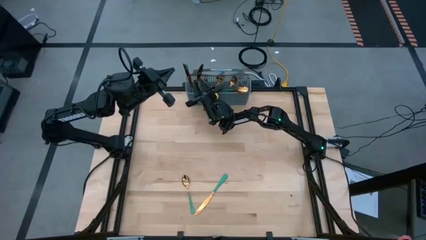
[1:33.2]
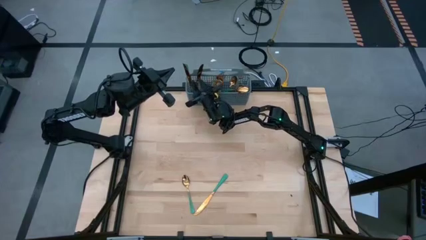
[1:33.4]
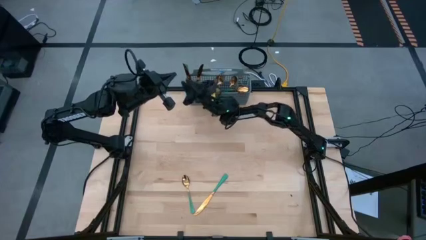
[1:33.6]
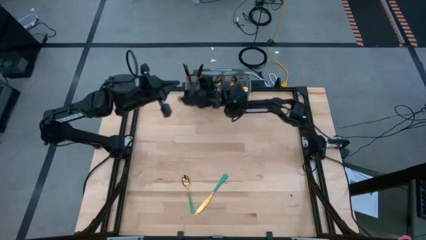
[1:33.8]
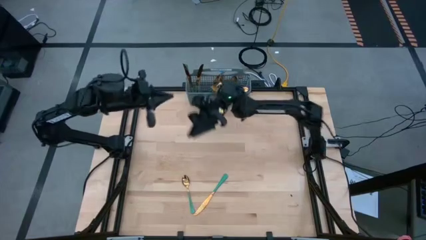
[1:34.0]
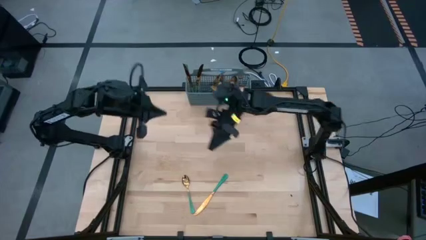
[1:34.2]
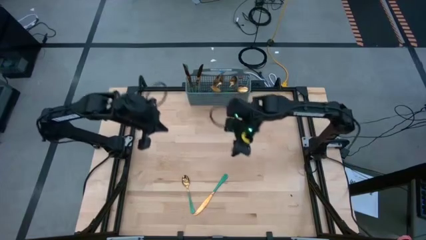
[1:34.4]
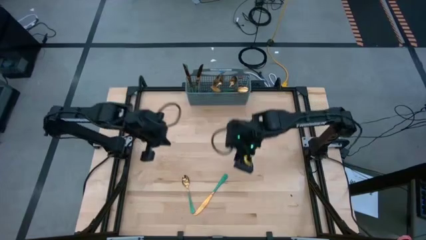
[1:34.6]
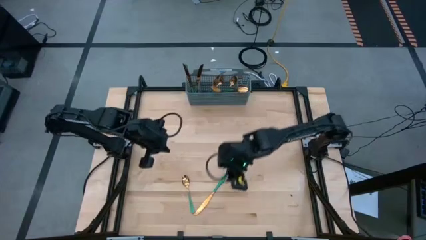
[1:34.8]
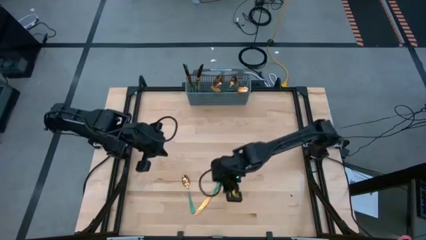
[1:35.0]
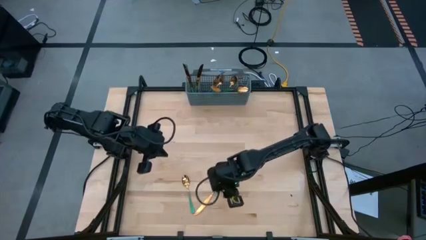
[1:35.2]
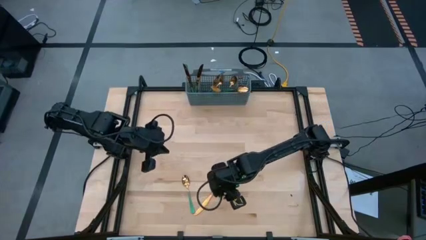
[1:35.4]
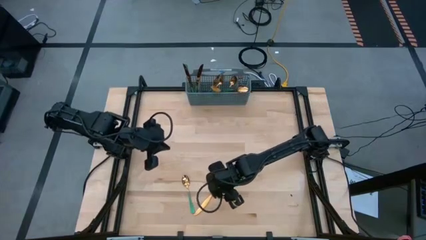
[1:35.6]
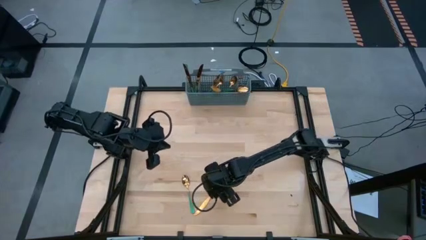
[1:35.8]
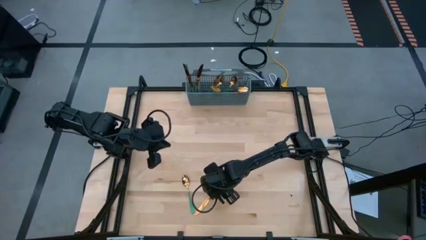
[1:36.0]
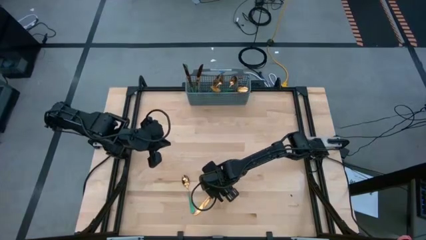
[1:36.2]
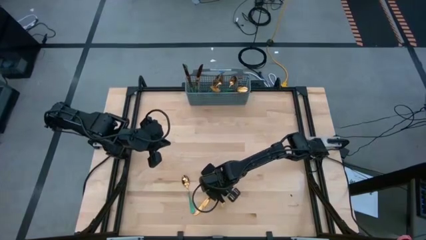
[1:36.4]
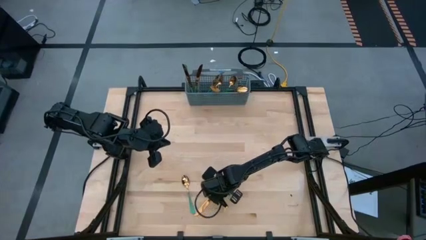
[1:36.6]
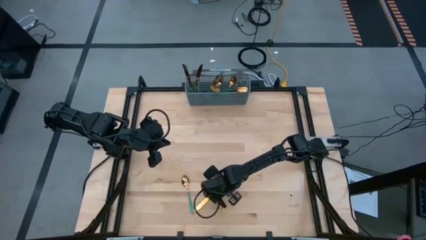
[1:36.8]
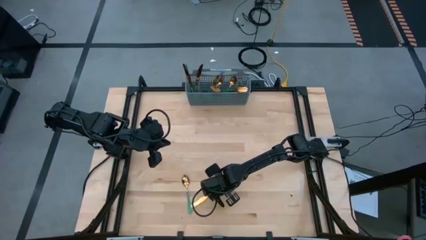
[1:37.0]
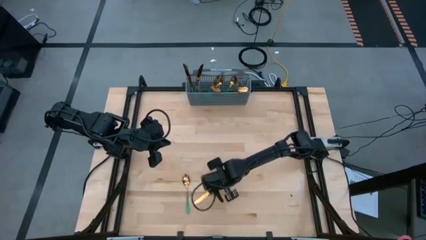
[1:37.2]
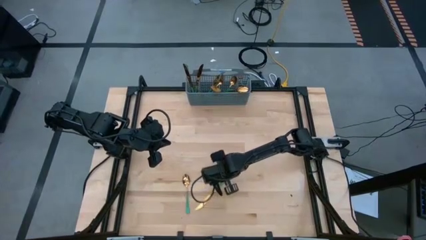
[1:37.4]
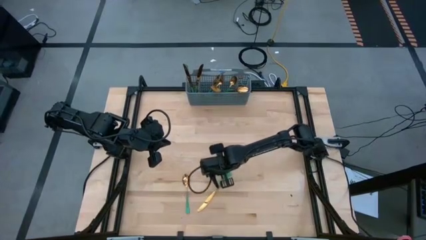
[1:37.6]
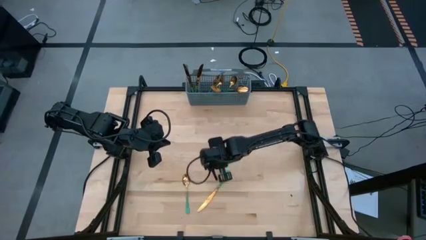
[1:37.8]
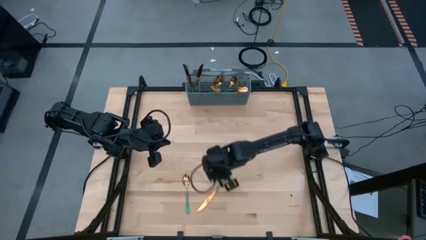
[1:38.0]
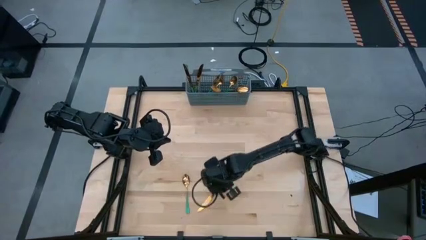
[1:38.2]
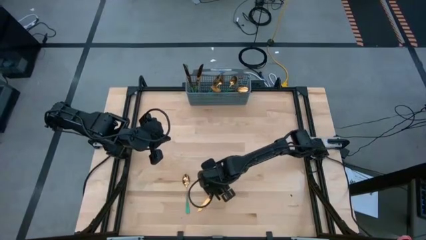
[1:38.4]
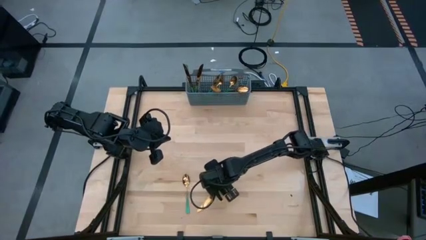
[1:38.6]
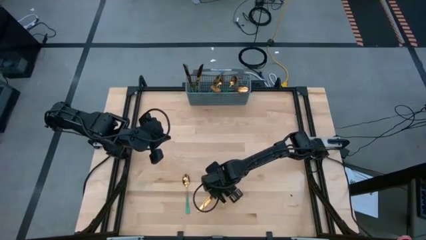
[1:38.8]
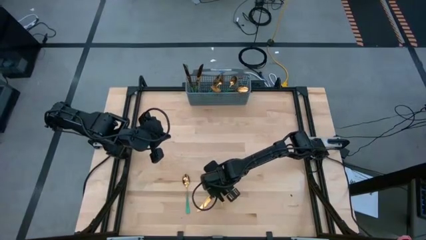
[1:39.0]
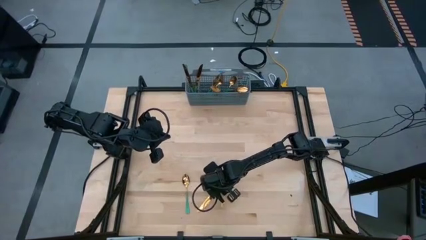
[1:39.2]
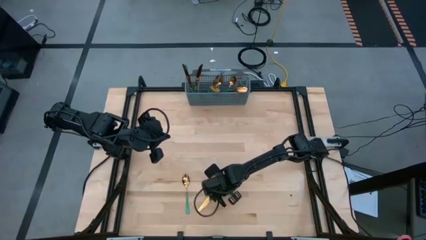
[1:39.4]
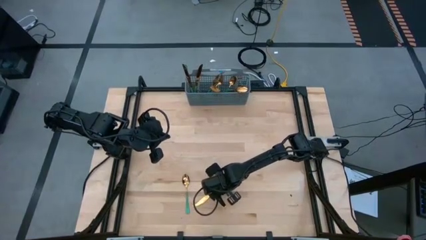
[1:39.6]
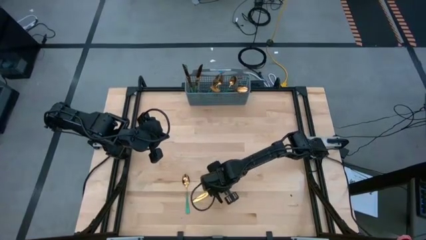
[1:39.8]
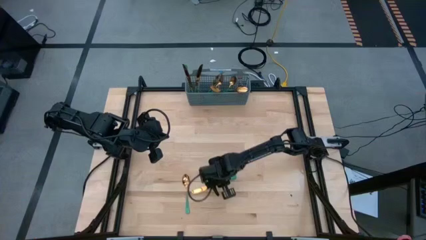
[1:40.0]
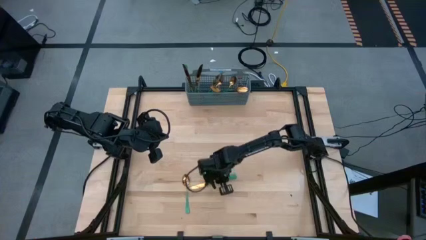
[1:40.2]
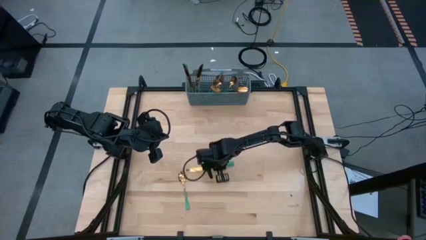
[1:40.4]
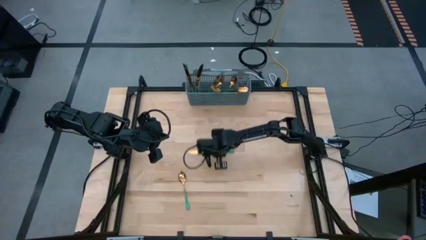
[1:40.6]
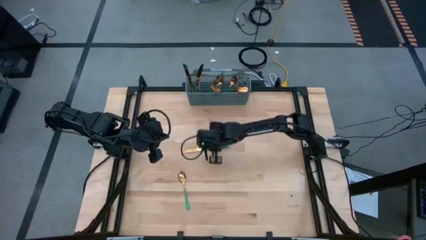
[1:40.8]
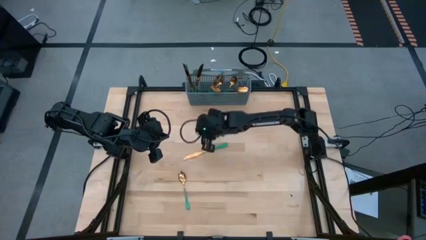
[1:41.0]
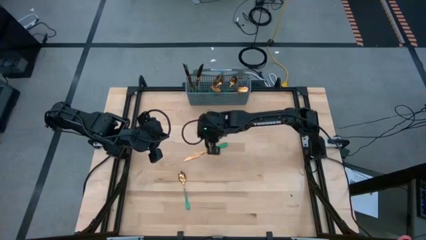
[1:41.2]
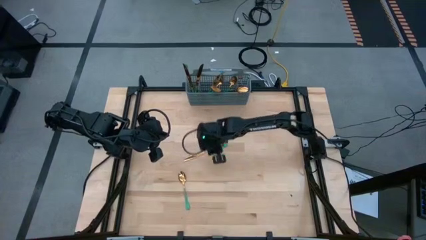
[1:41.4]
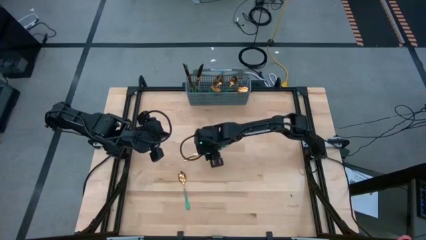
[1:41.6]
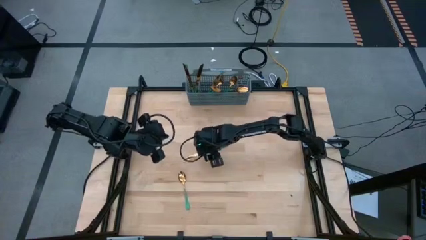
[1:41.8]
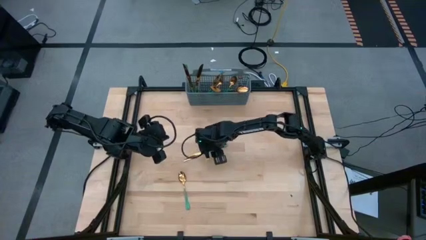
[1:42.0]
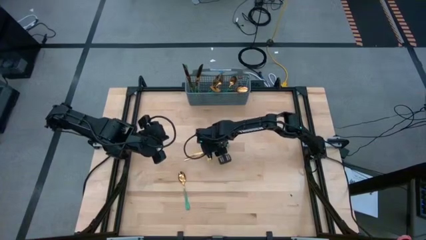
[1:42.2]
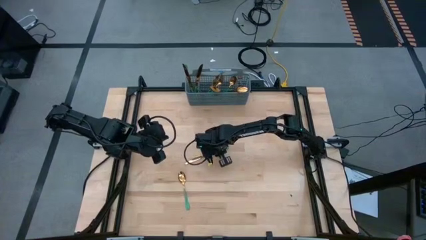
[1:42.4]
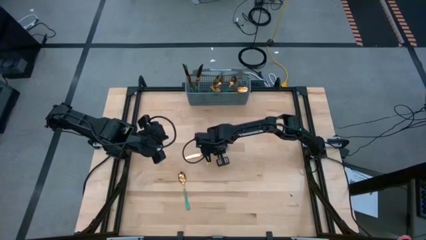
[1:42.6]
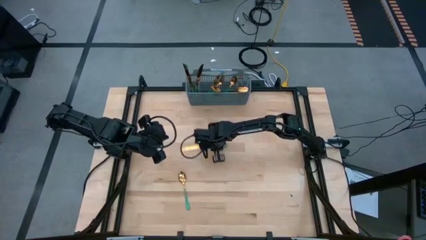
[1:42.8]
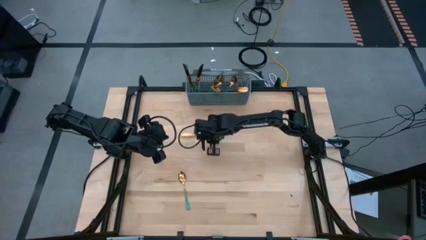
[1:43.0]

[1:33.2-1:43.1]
Task: Sort silverware
Put the green knife into the gray silverware organizer

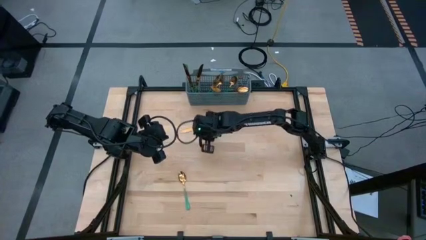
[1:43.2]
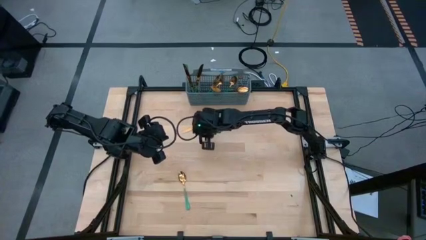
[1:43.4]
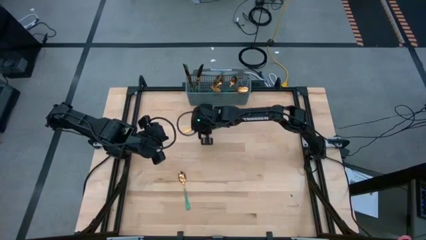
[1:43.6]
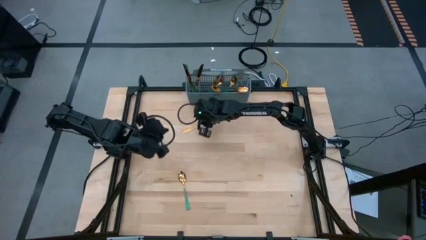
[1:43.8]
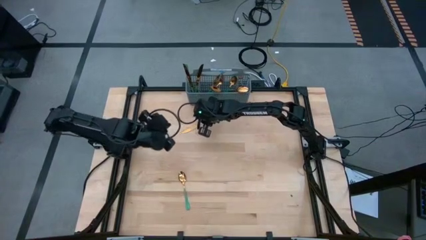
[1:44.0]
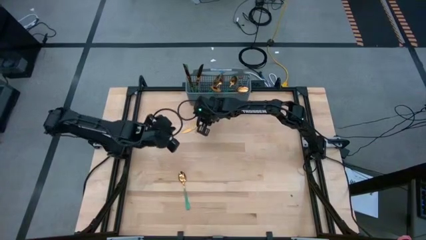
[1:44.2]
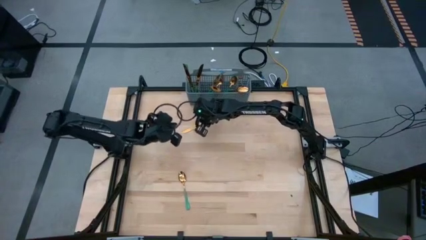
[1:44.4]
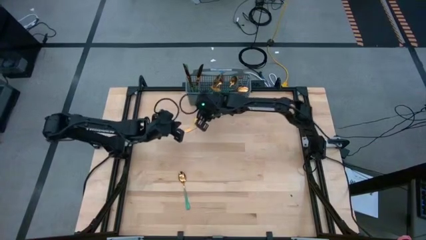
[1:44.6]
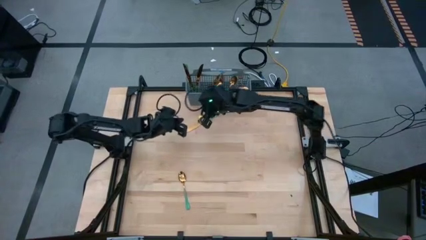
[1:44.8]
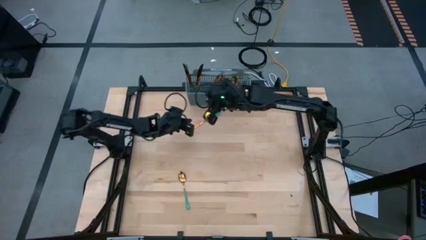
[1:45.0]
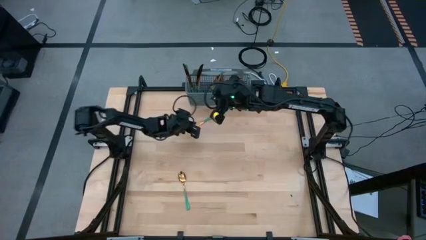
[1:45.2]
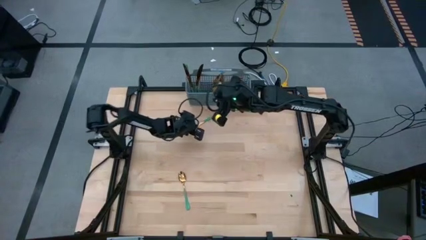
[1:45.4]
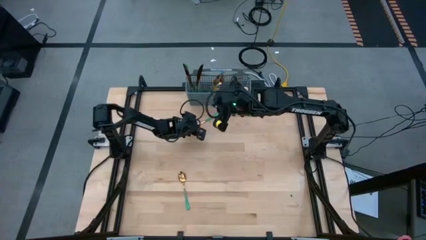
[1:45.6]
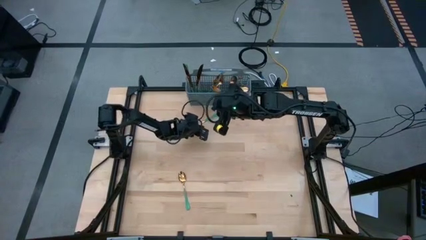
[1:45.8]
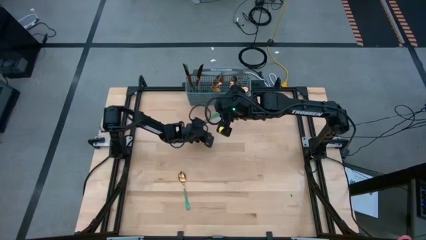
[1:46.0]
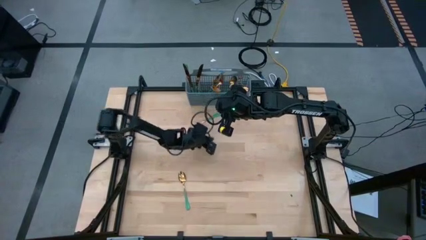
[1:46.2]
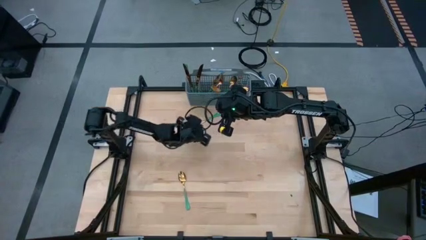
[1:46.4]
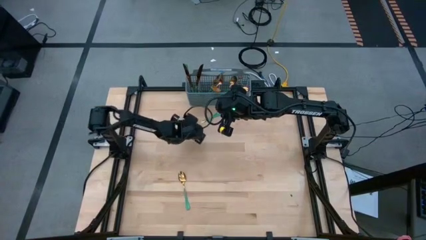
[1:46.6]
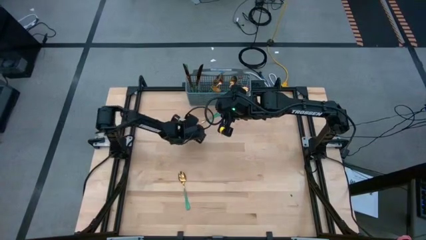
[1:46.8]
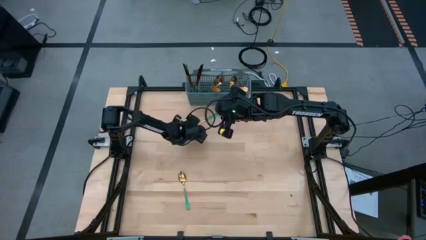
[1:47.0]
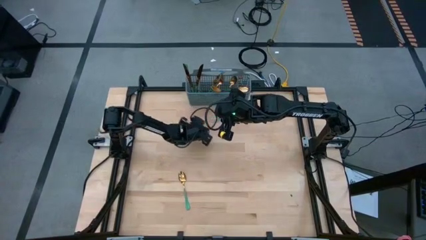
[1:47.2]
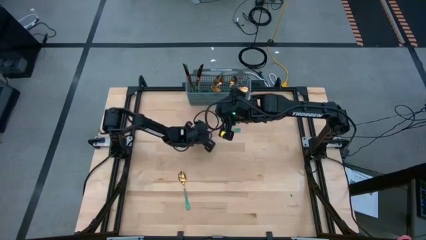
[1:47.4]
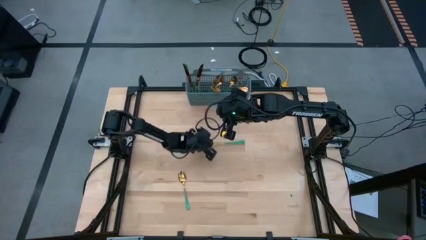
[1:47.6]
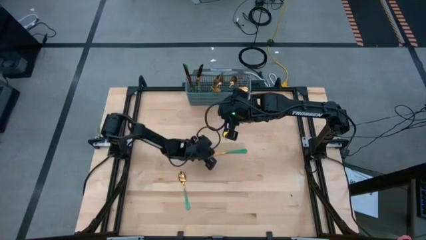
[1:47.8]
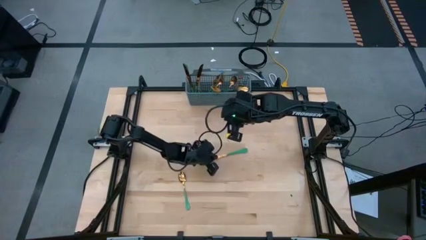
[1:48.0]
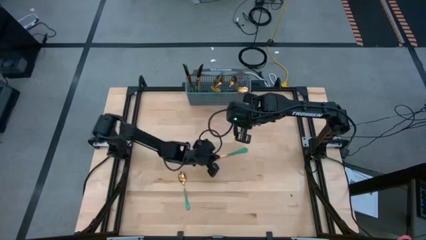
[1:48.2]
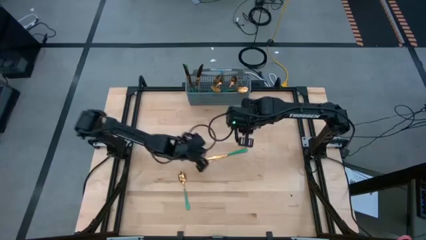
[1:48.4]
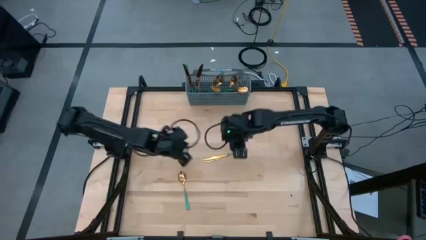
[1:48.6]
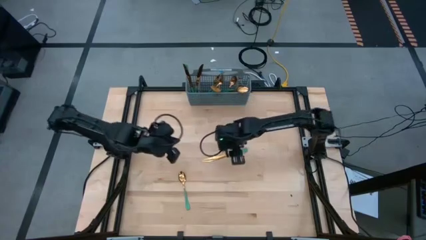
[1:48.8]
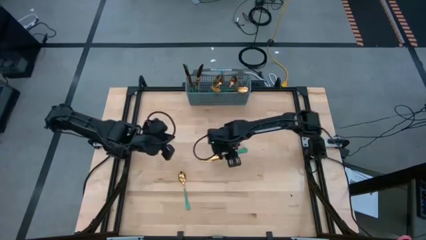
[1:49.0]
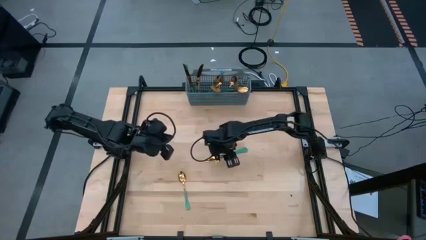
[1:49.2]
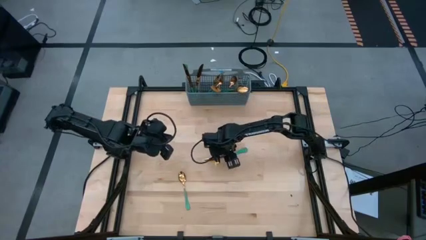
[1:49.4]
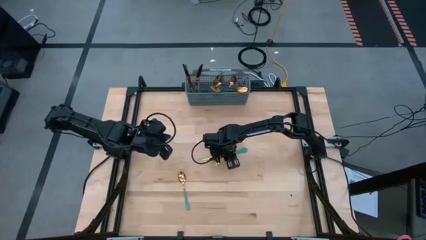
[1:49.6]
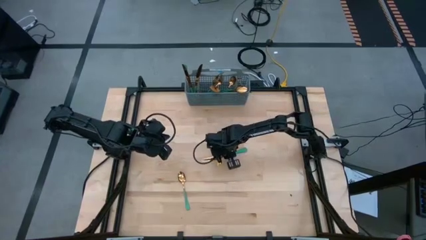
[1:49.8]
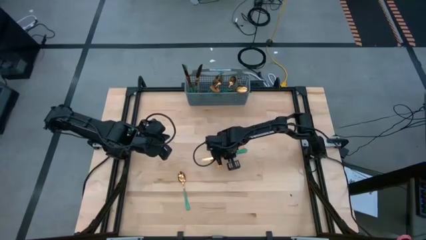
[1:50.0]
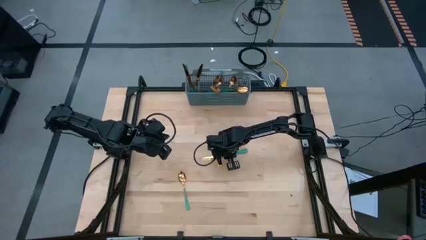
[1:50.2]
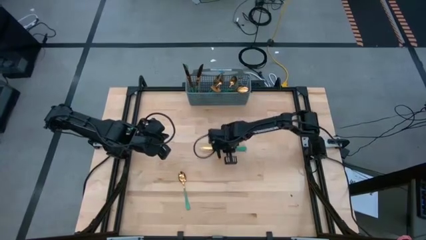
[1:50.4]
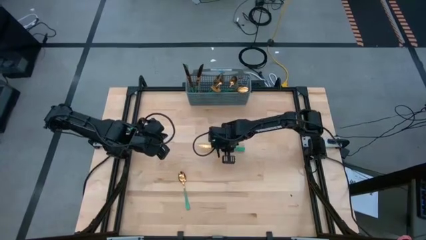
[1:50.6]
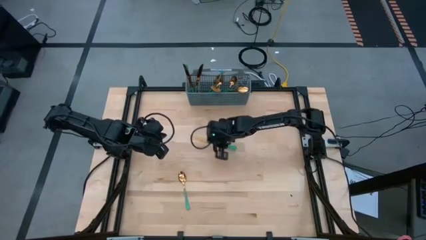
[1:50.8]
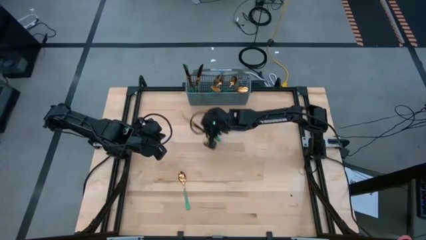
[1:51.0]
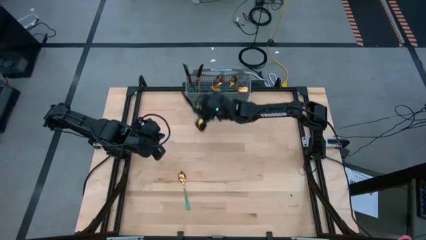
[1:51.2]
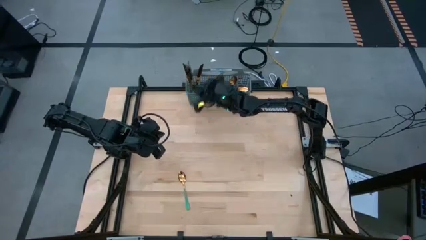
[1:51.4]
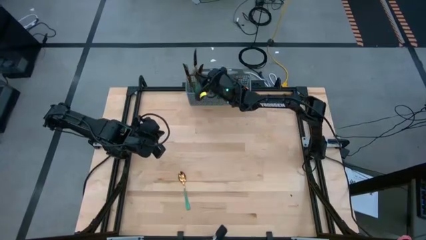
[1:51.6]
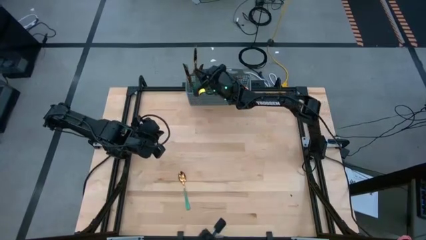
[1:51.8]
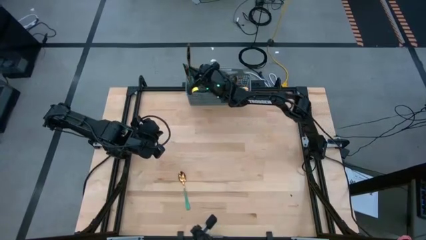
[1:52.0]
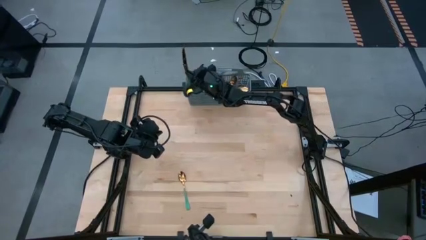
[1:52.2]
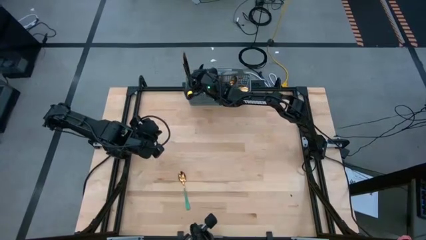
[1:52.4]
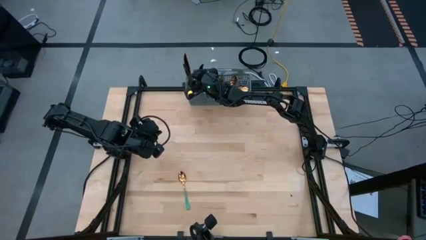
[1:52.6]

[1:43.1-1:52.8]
Put the green knife into the gray silverware organizer
